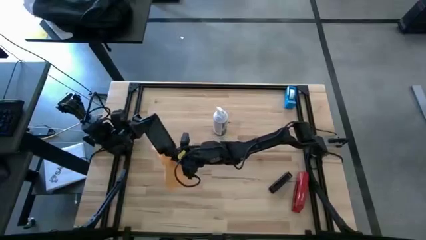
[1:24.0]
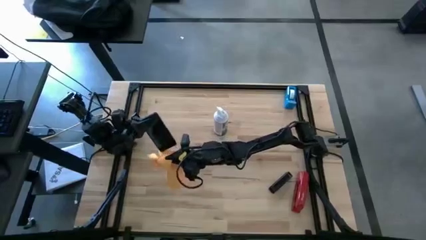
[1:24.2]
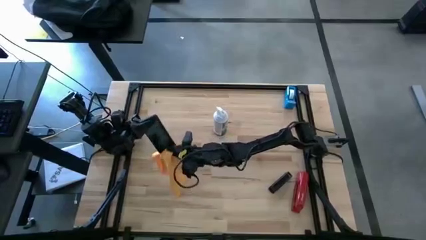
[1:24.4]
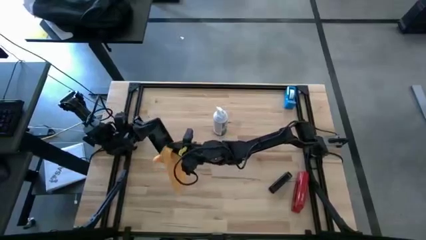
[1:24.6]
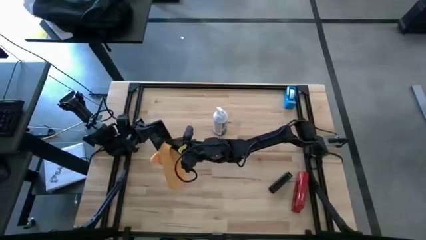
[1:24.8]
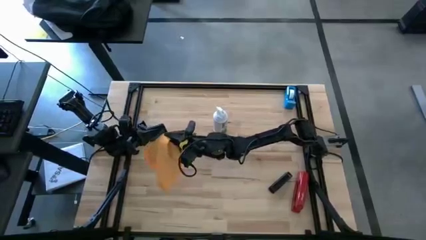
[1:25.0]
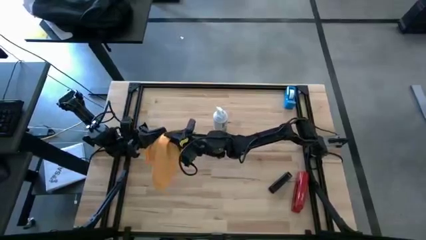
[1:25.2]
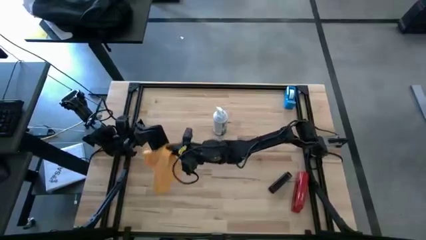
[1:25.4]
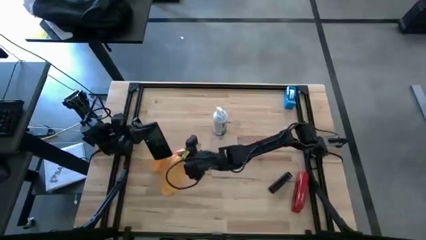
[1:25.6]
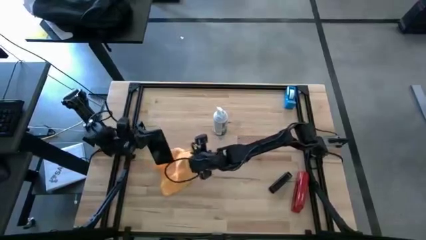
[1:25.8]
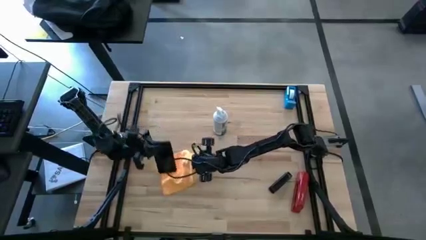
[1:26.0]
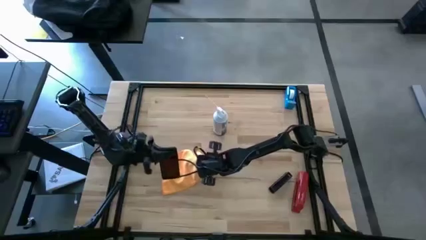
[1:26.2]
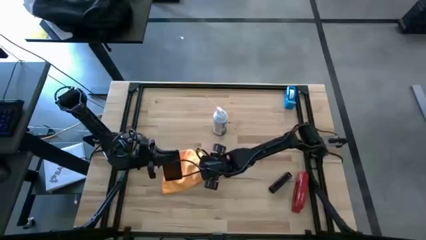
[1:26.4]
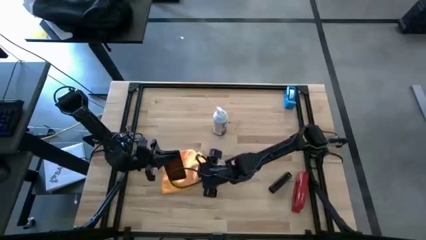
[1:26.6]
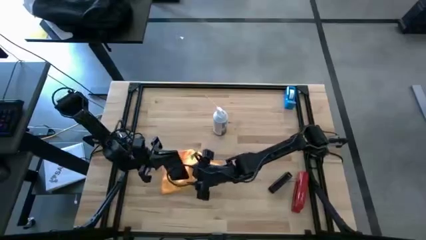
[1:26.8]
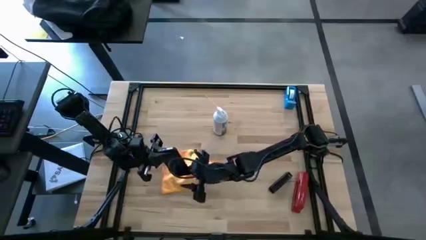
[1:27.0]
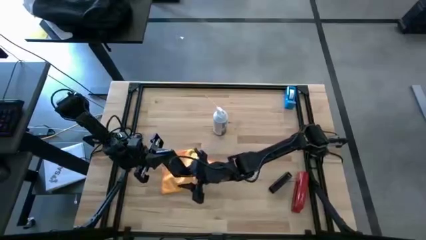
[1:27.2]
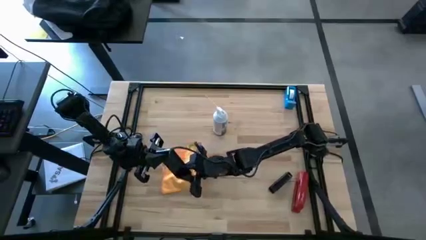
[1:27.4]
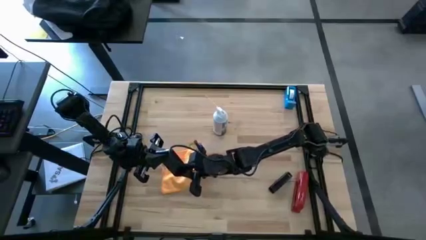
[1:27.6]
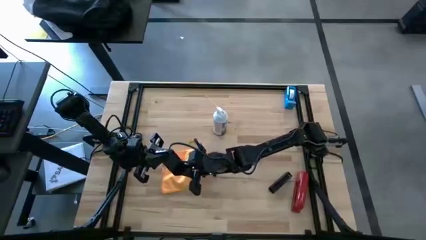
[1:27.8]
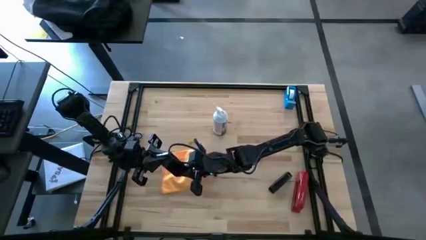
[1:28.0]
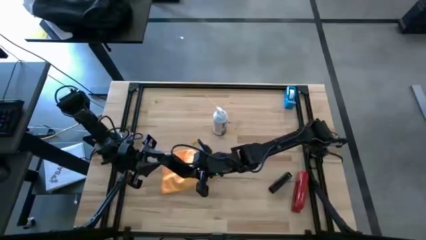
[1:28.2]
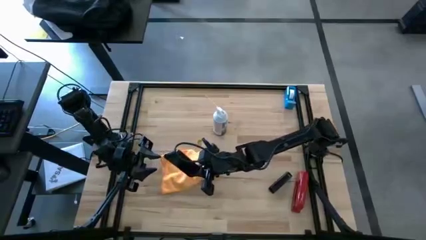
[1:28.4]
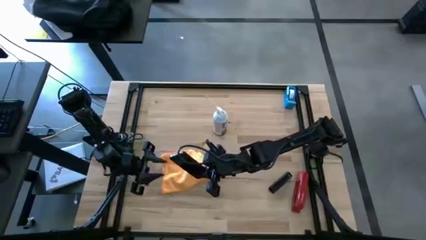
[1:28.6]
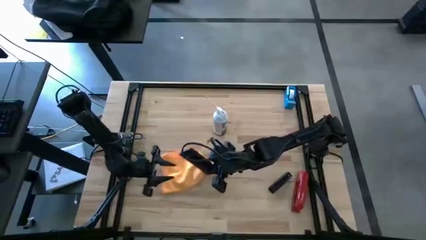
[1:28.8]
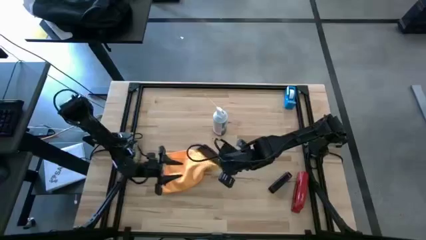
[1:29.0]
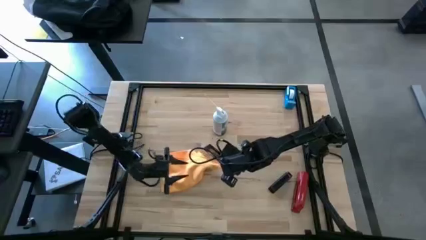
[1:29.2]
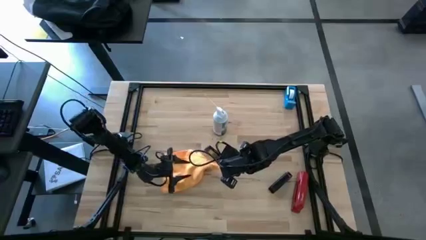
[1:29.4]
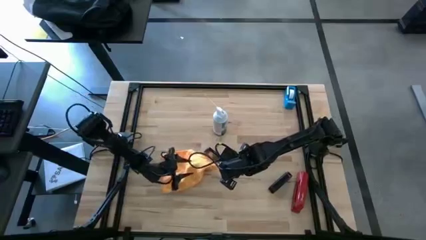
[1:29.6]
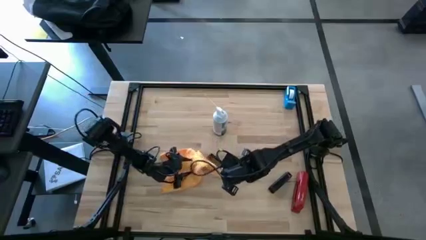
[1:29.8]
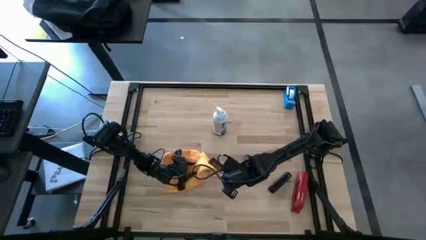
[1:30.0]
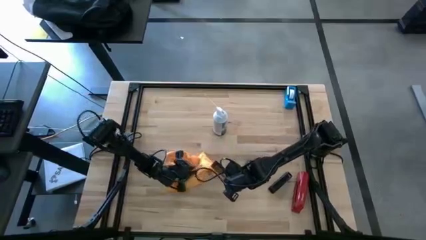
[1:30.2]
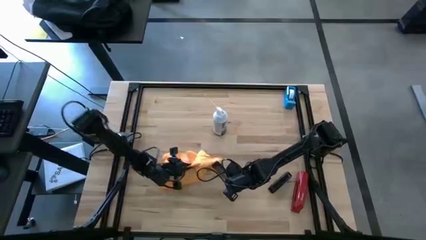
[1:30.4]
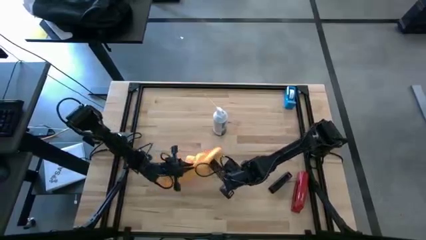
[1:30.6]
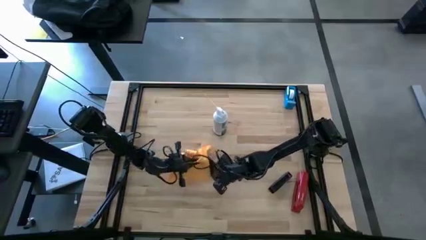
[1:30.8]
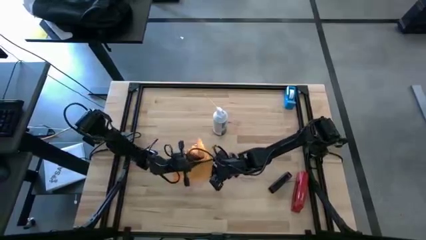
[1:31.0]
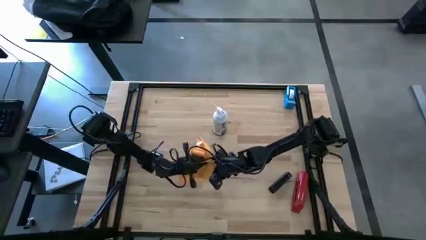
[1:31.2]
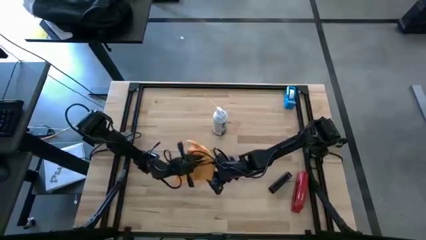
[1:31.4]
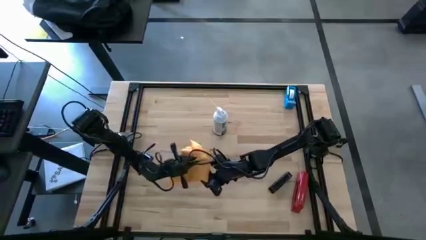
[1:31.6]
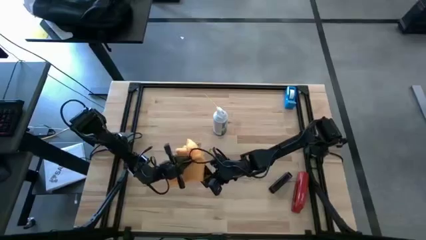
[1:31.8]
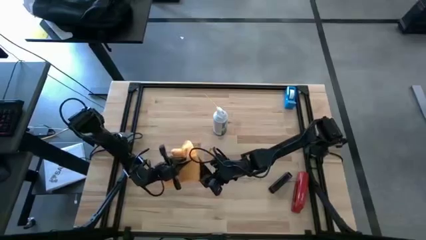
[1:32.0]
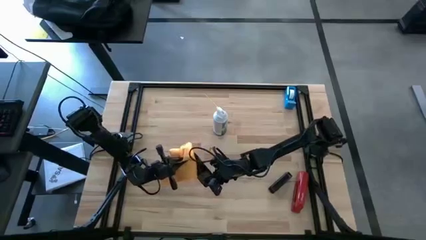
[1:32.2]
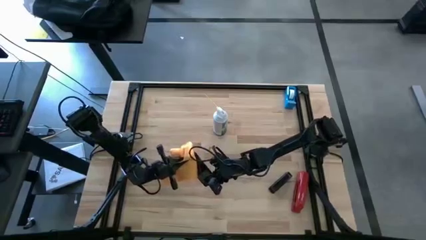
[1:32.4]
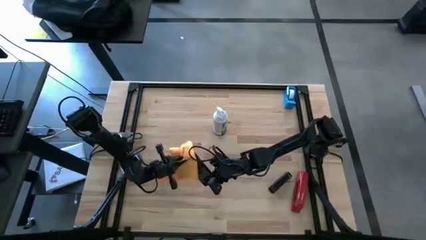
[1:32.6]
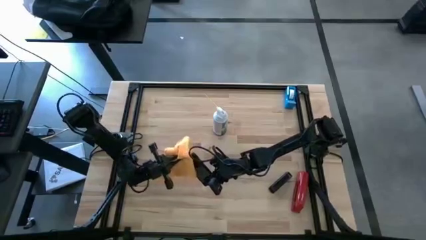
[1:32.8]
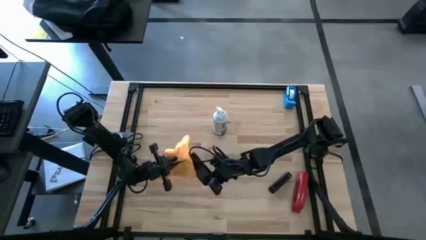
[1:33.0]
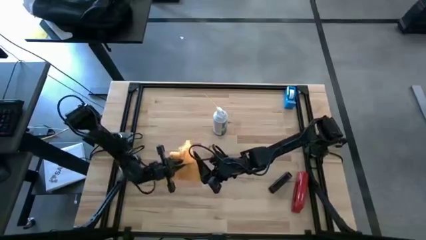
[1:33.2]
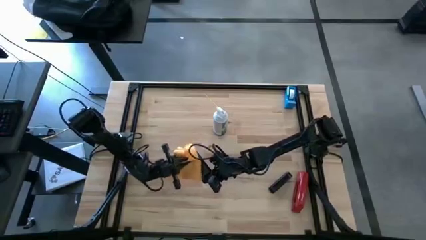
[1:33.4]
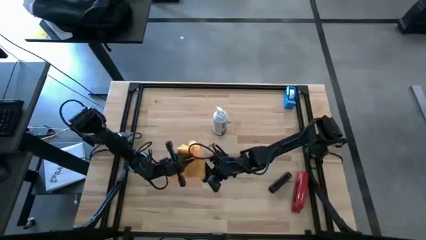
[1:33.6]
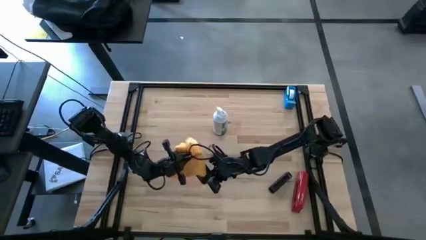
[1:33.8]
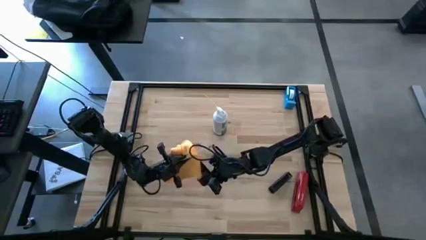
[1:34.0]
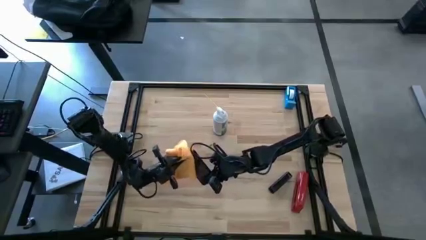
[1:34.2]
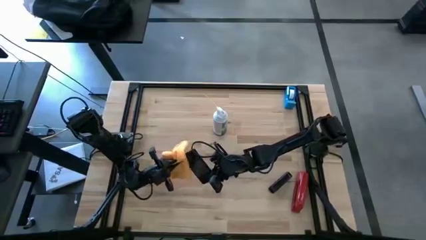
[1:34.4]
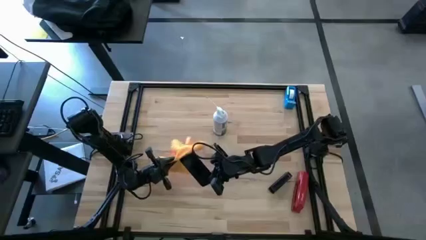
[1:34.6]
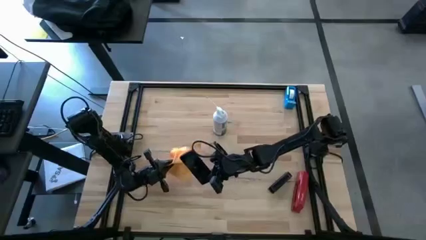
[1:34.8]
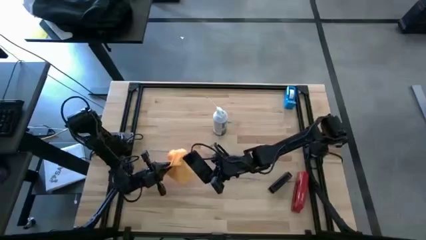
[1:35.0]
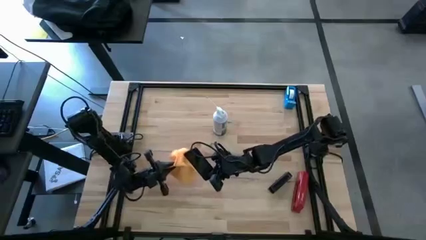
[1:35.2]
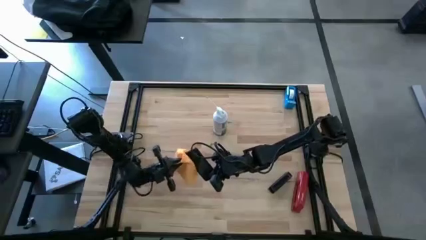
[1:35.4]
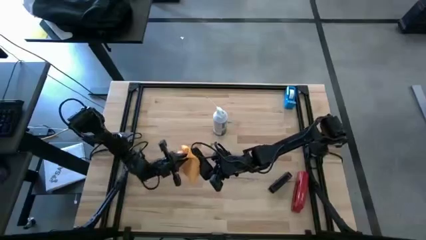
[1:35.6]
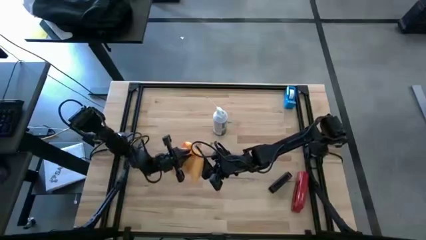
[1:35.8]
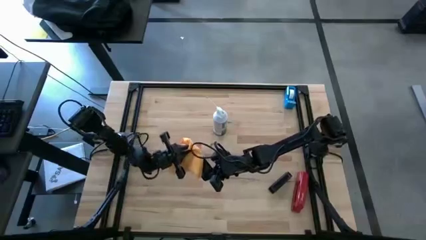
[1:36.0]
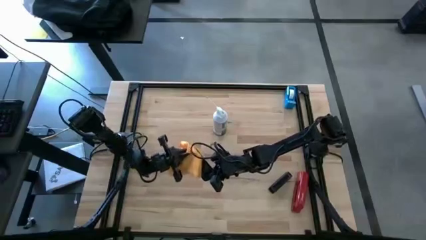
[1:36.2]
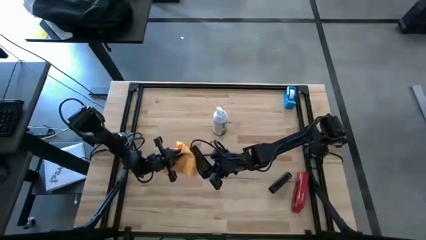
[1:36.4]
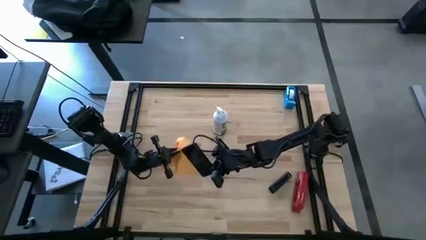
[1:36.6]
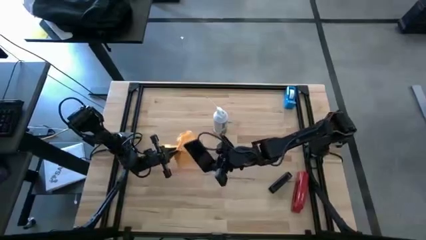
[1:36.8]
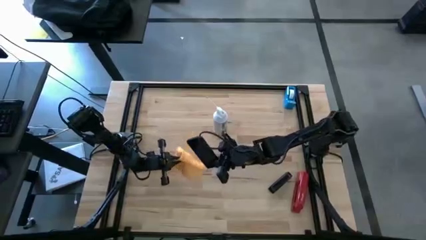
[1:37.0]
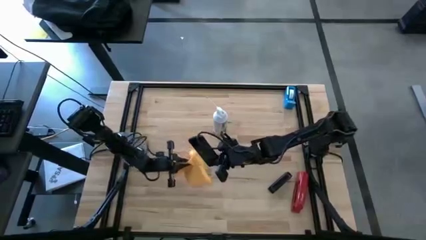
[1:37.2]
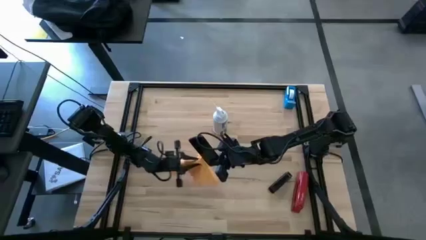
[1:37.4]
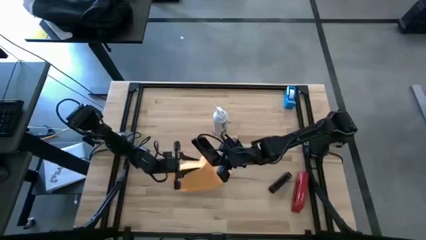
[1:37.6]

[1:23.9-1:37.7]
Task: Apply microfiber cloth
Wipe the front of the cellphone with the yellow microfiber cloth
